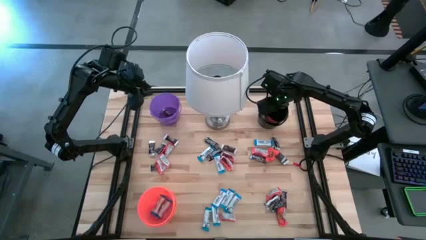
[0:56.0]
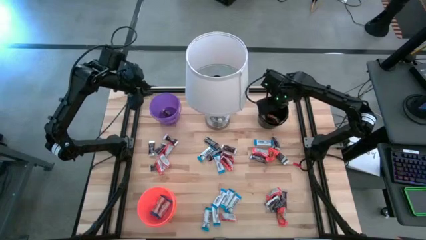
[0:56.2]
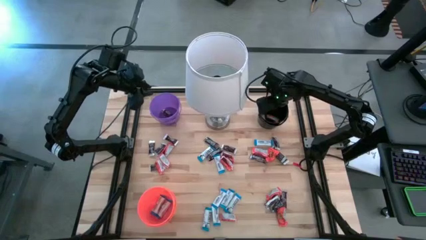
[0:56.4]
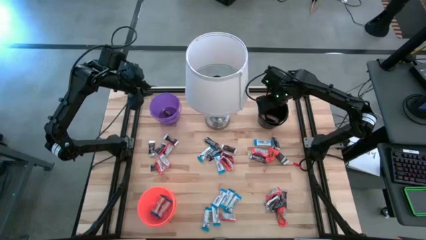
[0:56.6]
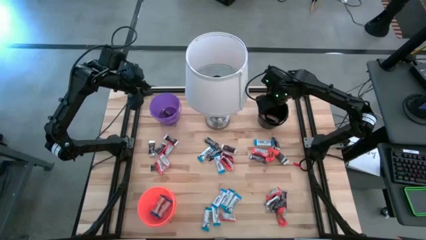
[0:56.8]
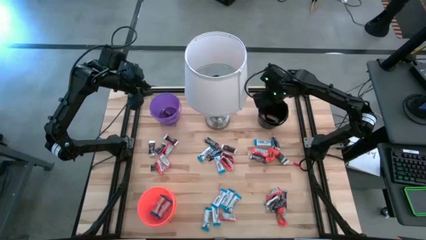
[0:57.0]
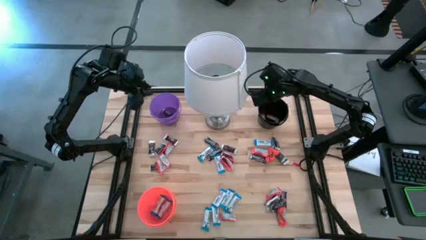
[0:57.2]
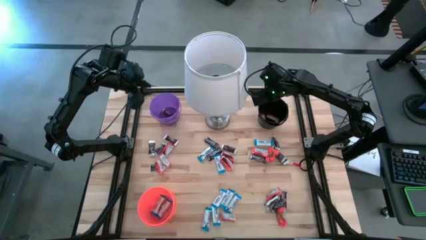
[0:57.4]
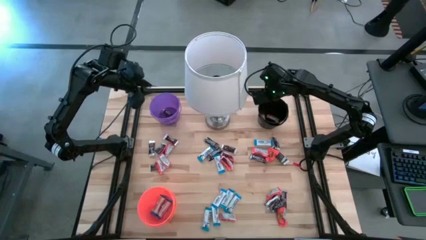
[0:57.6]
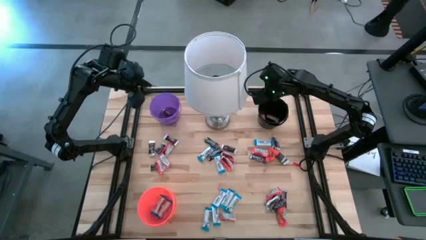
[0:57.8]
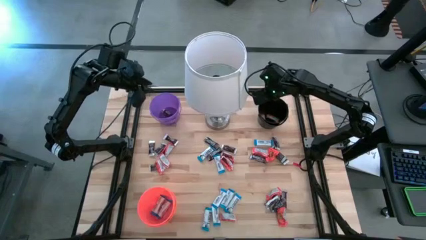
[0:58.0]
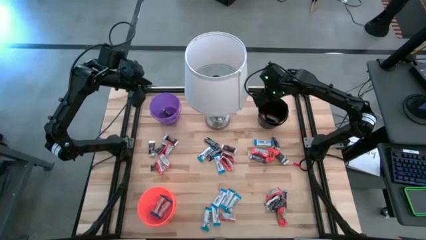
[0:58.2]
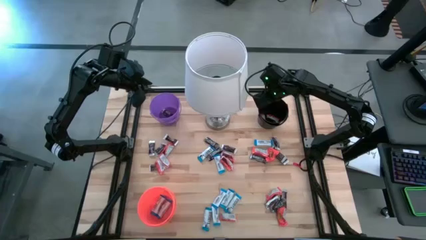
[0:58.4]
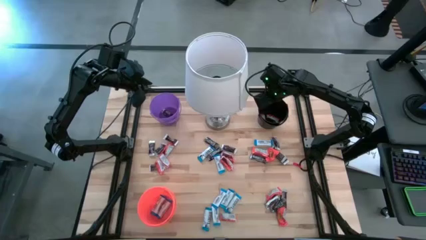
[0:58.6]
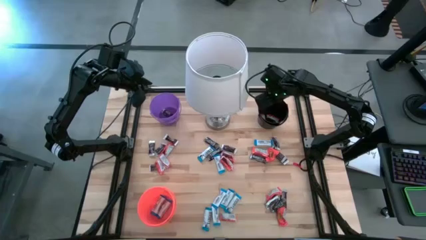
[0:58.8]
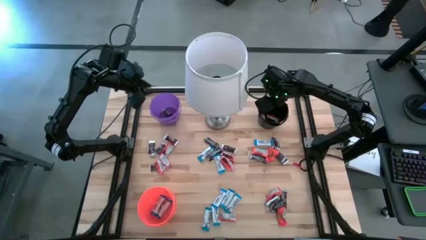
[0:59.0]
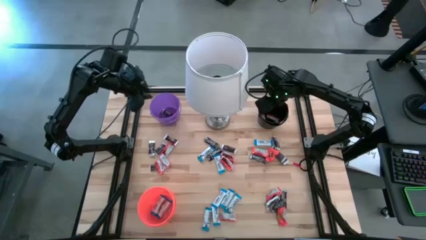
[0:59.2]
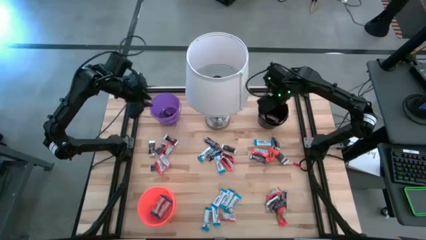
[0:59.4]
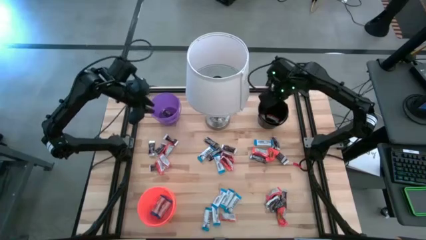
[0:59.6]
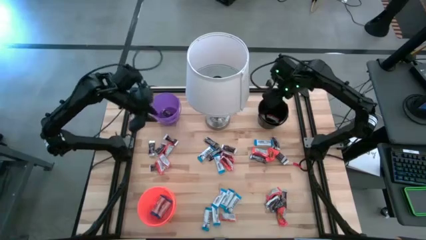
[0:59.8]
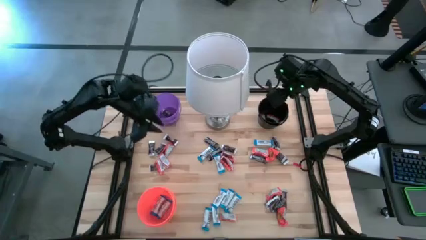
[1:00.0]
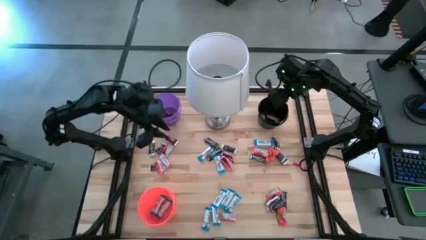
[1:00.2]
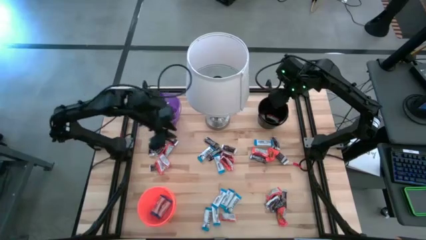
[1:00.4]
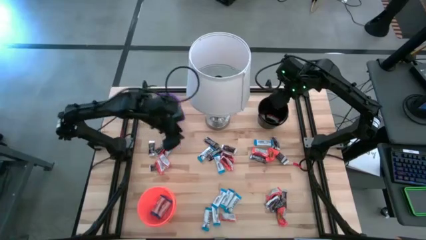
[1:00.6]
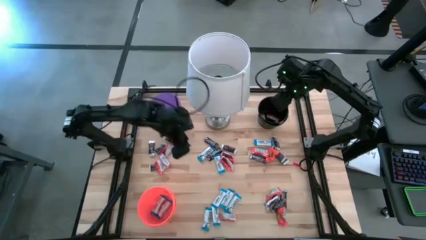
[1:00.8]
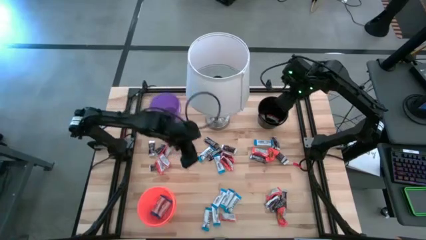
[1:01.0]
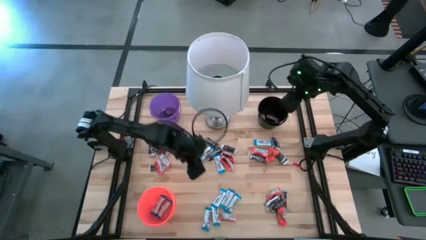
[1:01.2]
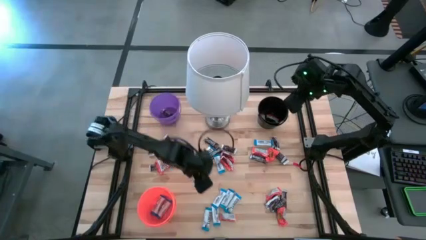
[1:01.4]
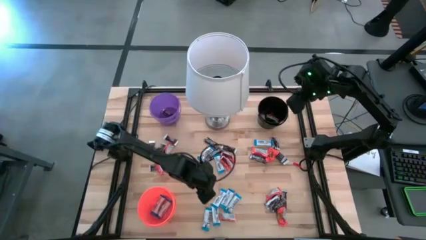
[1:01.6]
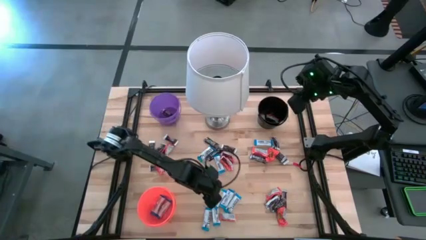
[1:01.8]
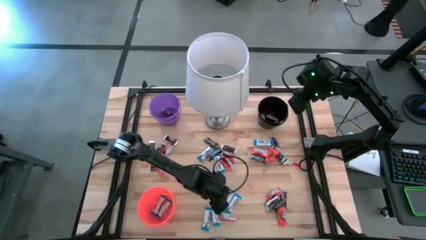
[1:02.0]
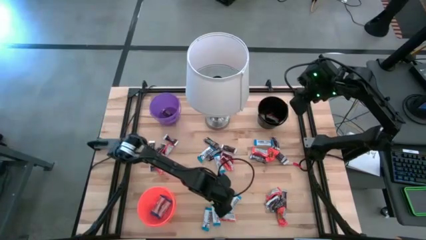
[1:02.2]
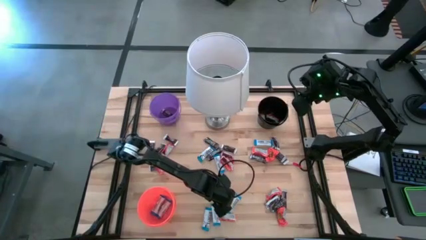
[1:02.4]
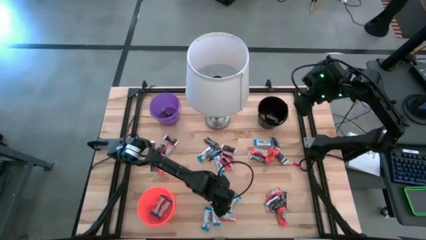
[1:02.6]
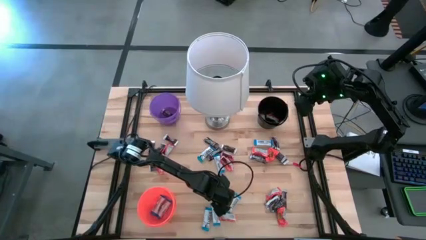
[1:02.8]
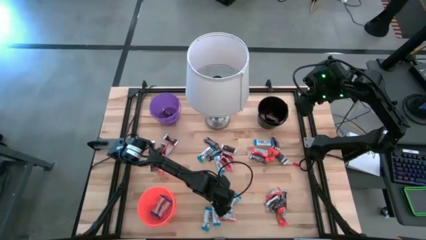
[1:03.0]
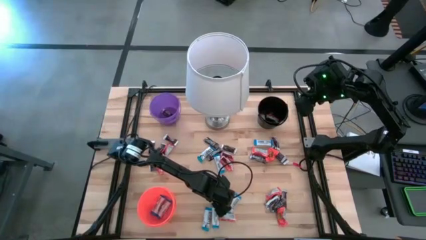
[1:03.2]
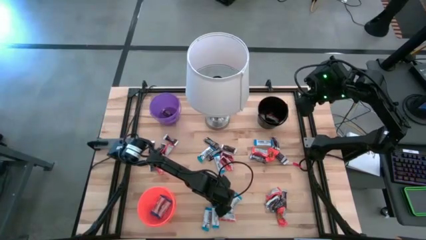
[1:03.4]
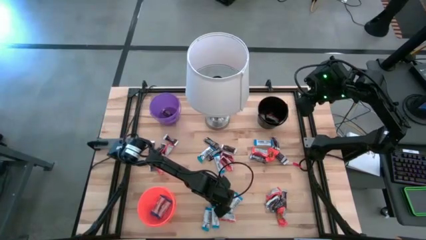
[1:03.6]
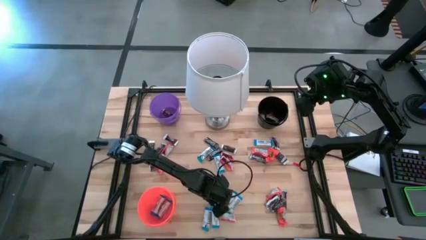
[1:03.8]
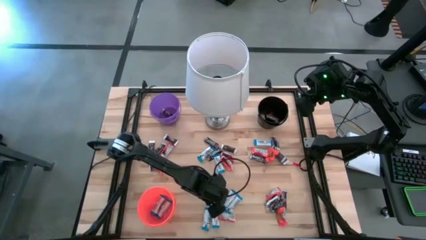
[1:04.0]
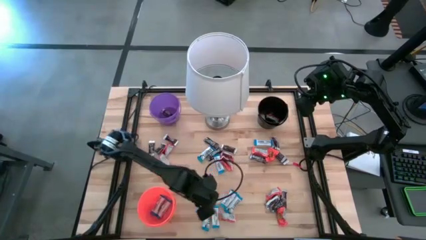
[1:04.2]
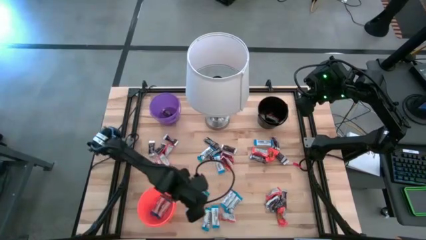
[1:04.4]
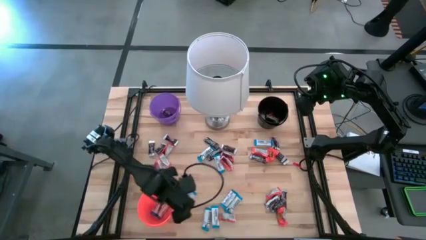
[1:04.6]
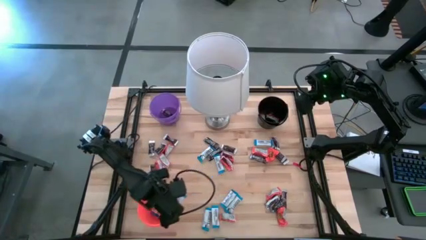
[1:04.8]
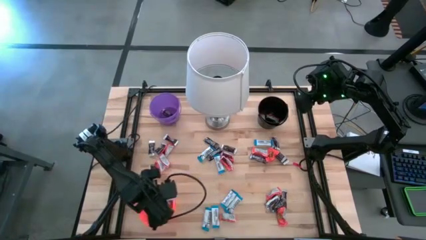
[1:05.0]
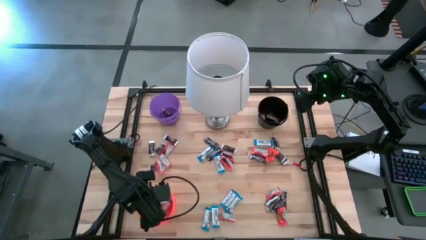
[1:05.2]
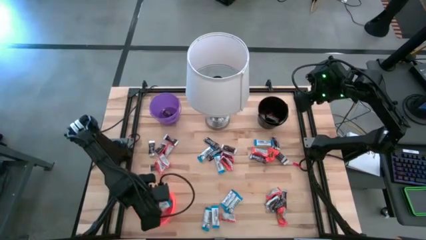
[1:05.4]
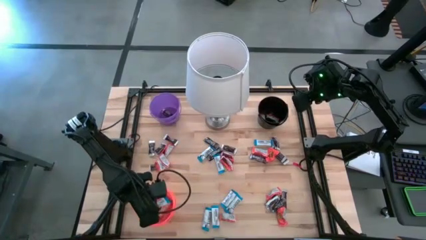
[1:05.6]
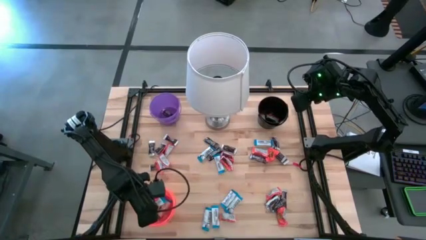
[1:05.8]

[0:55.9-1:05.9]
Task: Organize candy in baskets
Put the white chocolate bar into the orange bucket

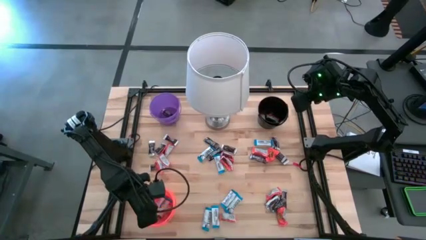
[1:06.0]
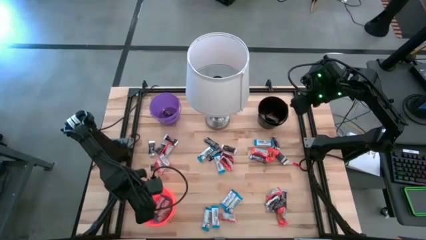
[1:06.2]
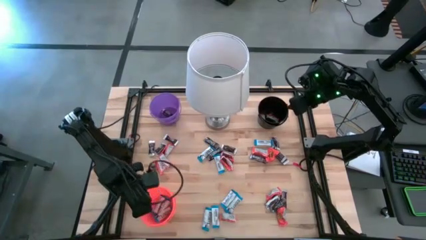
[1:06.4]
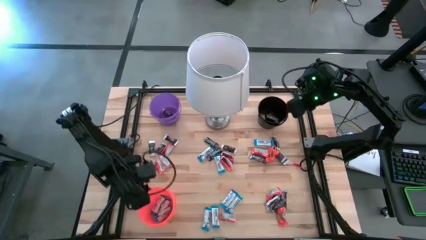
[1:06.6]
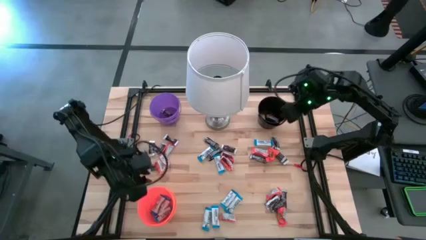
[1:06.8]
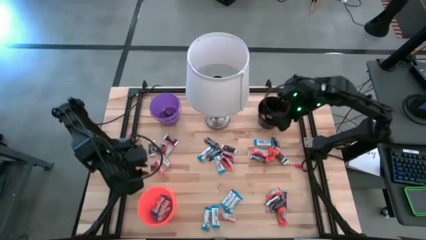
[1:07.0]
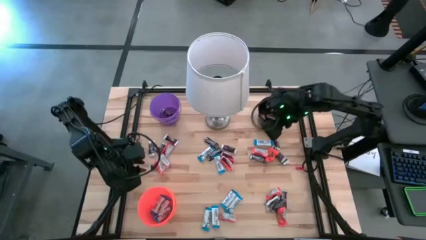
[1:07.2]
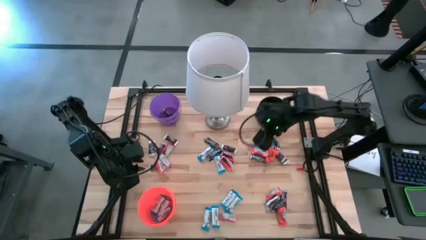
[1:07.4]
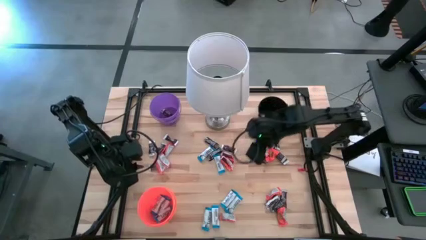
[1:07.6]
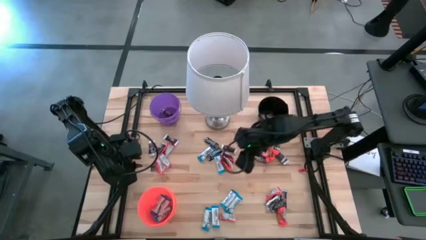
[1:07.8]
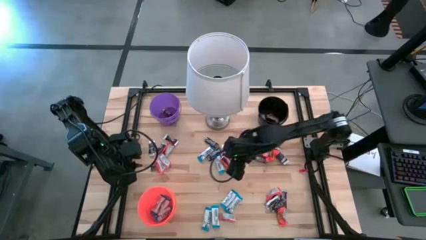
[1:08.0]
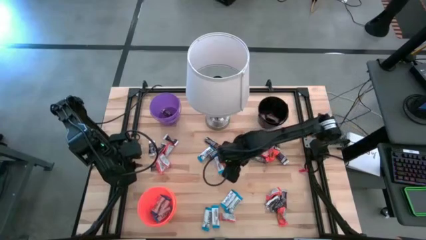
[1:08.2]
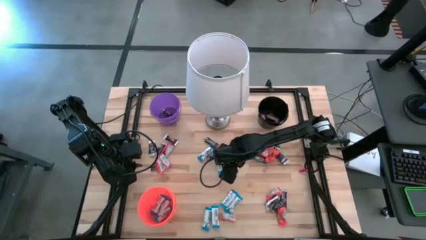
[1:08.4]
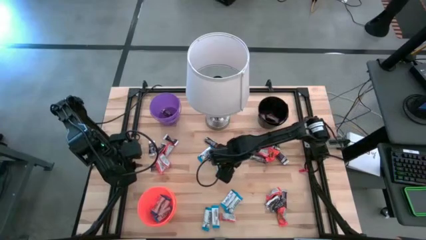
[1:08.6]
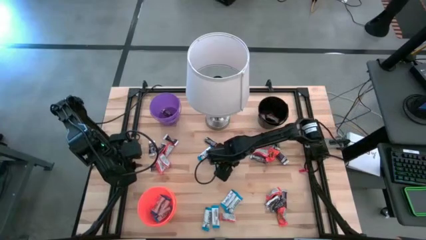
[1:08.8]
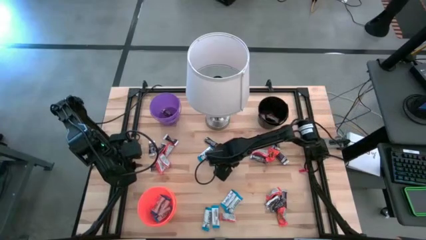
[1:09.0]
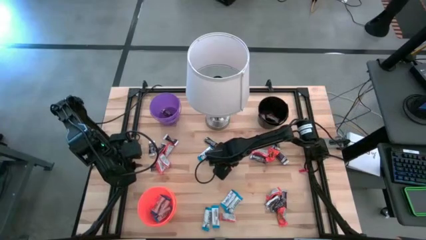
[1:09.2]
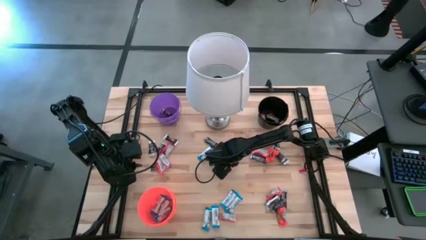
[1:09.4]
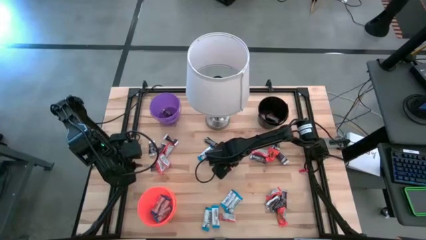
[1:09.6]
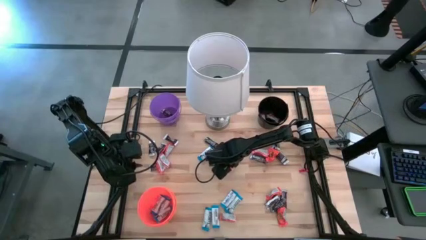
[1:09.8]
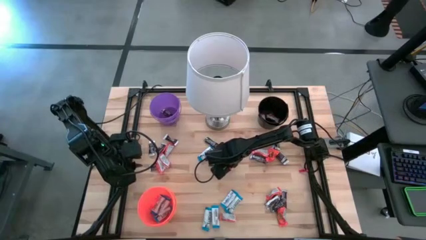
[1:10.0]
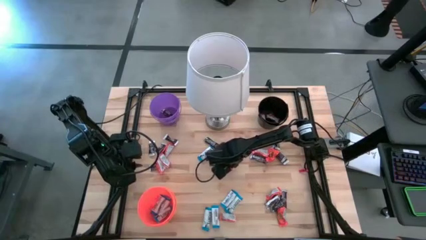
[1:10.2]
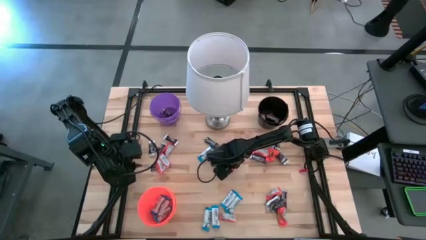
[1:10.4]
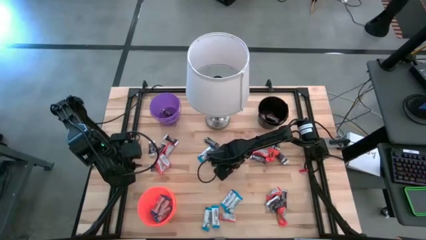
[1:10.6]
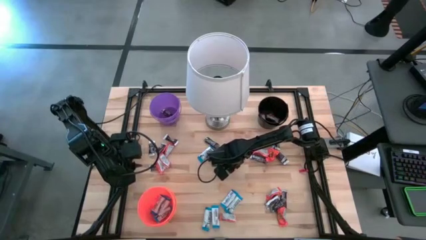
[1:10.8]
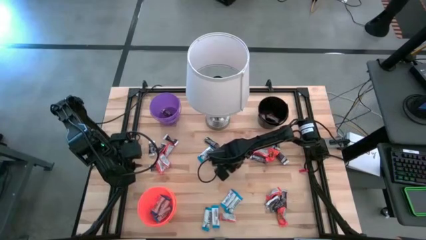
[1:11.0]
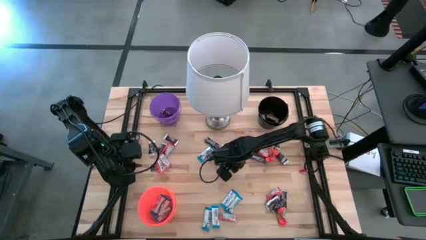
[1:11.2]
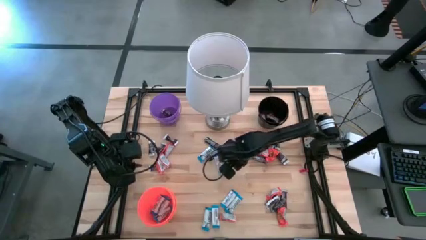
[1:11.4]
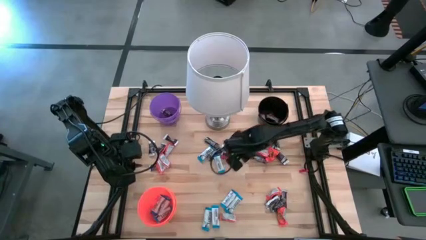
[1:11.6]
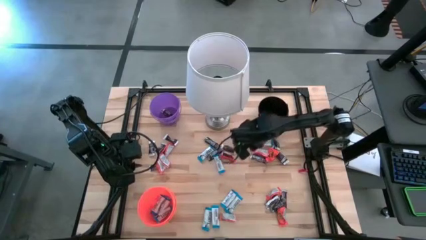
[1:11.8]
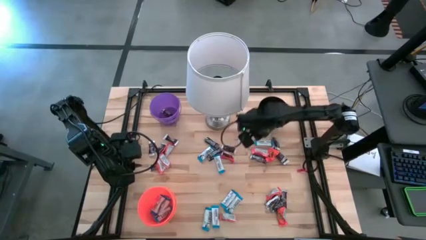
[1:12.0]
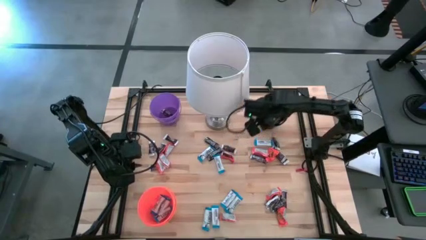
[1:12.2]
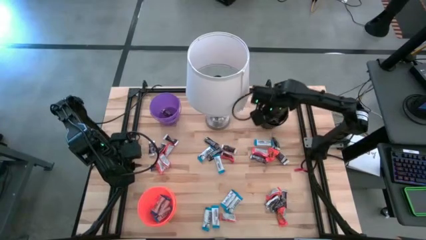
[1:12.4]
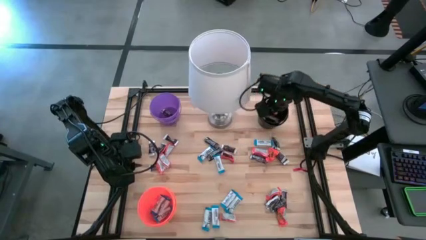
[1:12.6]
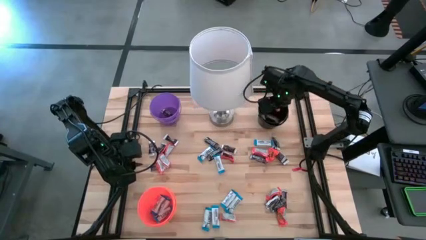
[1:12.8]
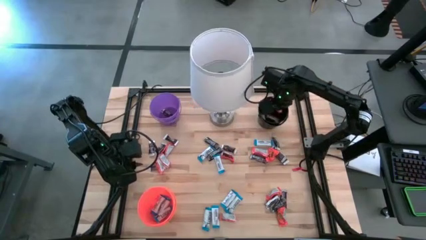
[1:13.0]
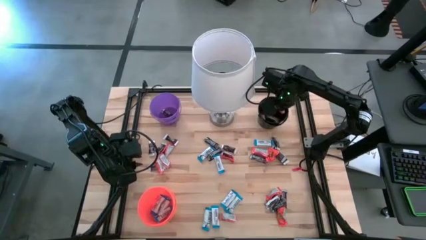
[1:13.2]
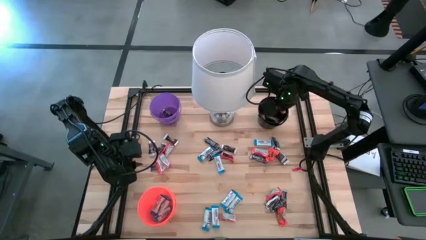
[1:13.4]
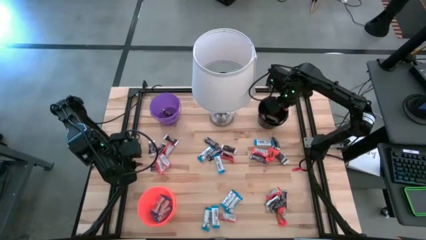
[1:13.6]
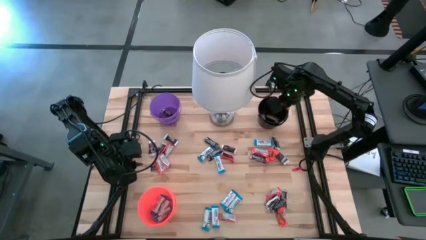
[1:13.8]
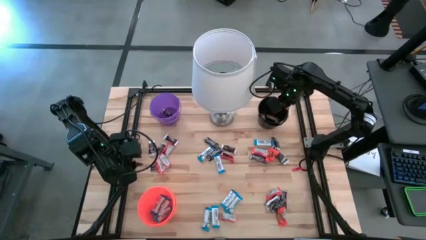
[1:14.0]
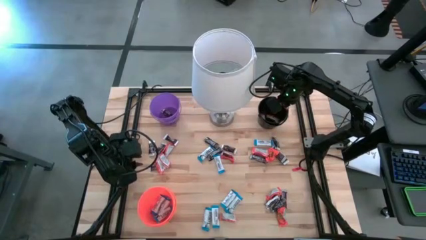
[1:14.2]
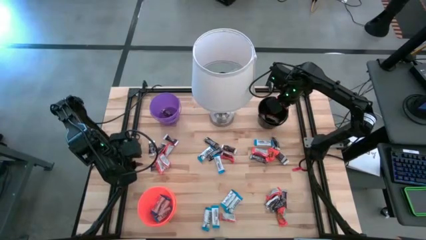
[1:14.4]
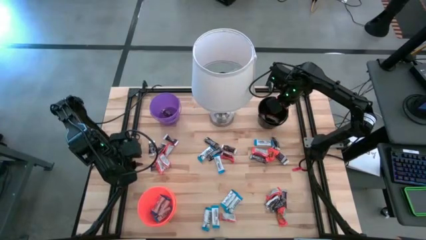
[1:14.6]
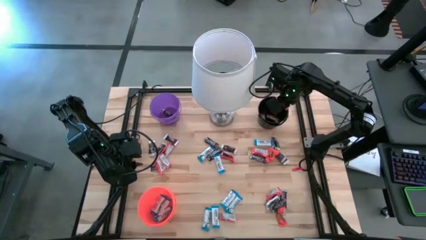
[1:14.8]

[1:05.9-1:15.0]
Put the orange chocolate bar into the black bucket
